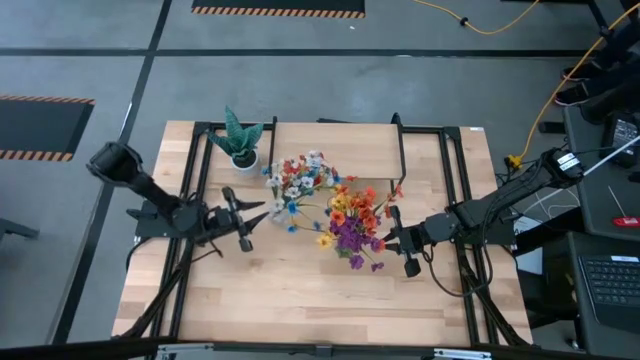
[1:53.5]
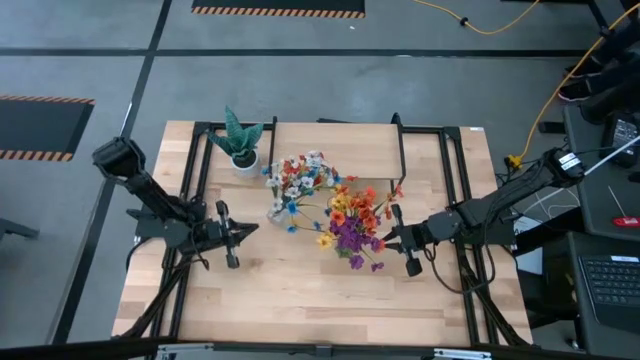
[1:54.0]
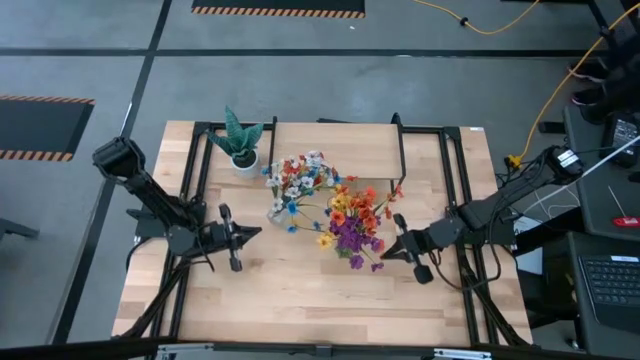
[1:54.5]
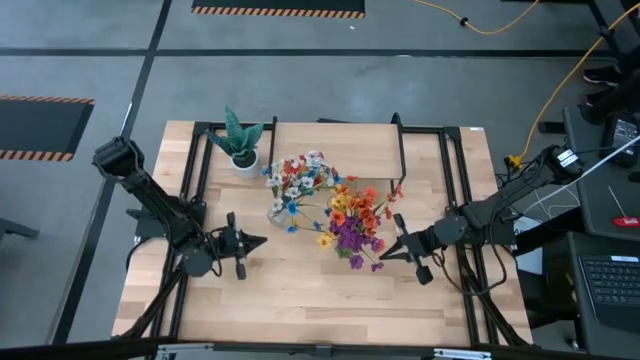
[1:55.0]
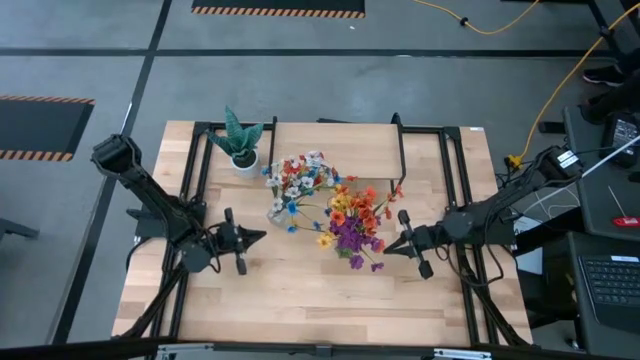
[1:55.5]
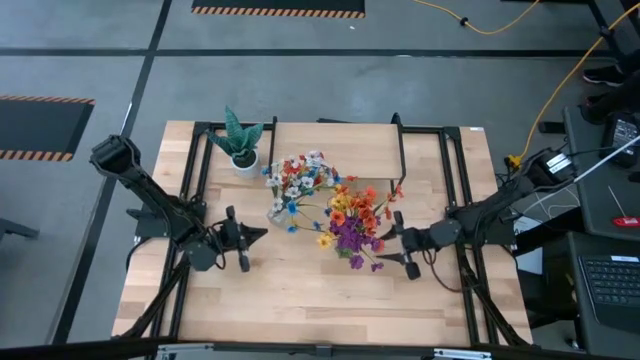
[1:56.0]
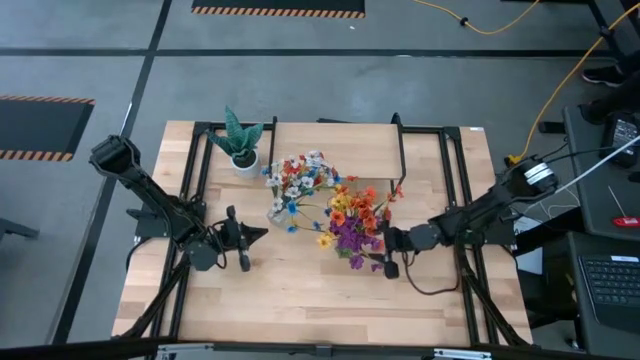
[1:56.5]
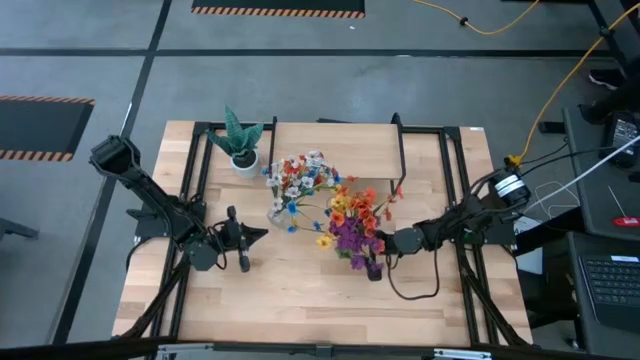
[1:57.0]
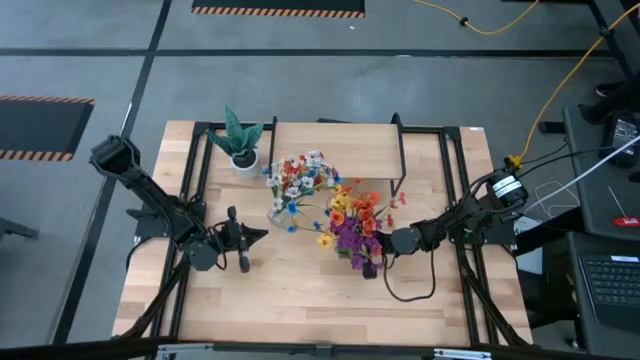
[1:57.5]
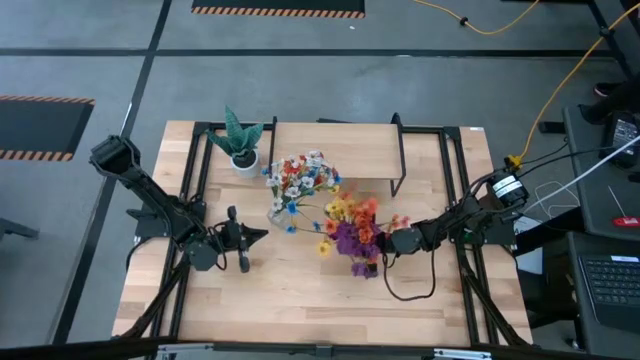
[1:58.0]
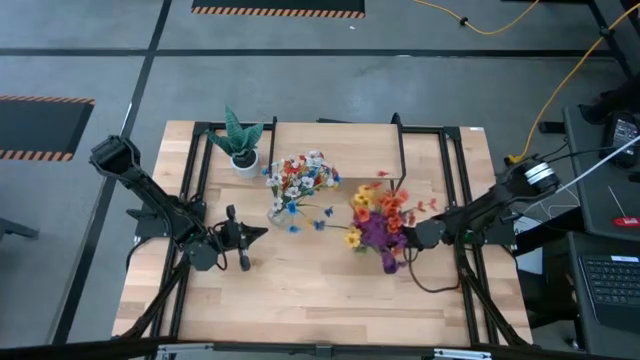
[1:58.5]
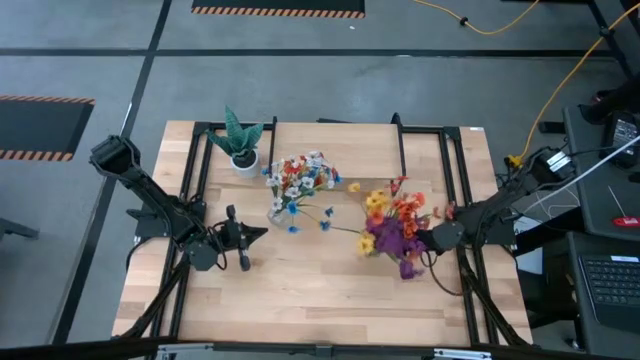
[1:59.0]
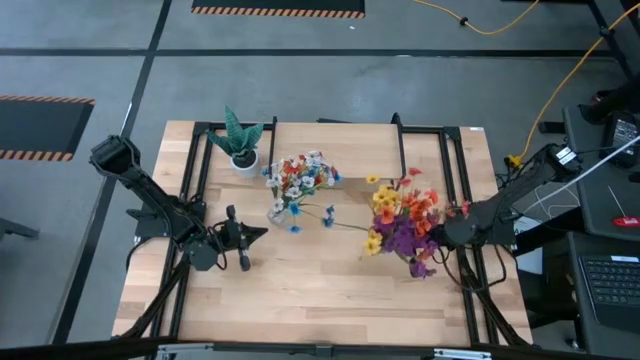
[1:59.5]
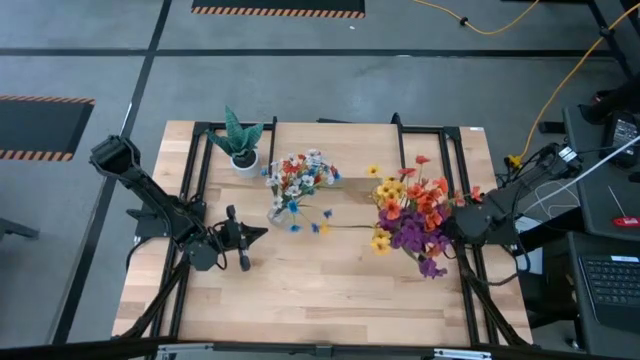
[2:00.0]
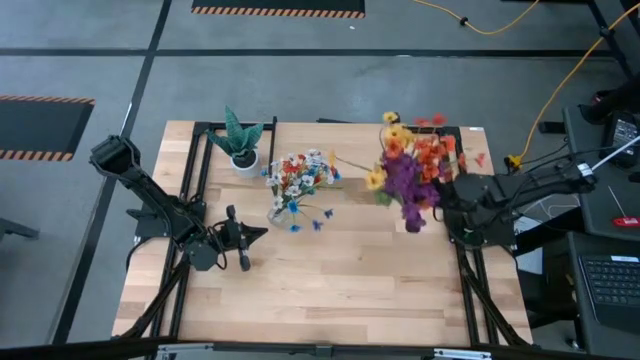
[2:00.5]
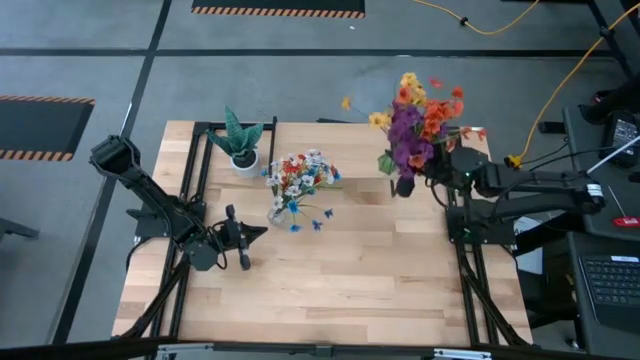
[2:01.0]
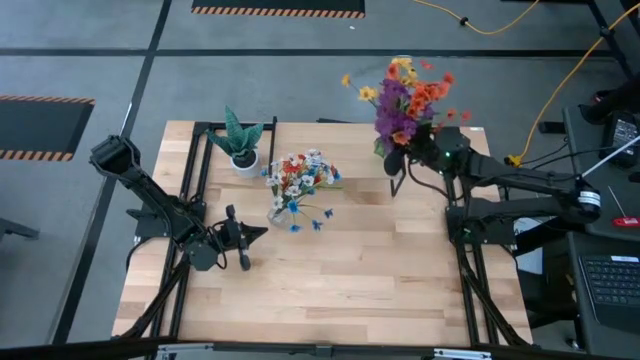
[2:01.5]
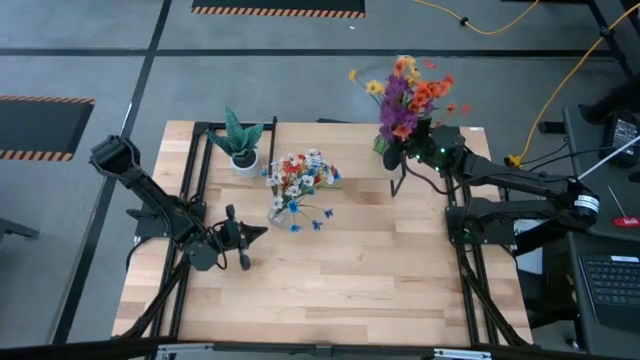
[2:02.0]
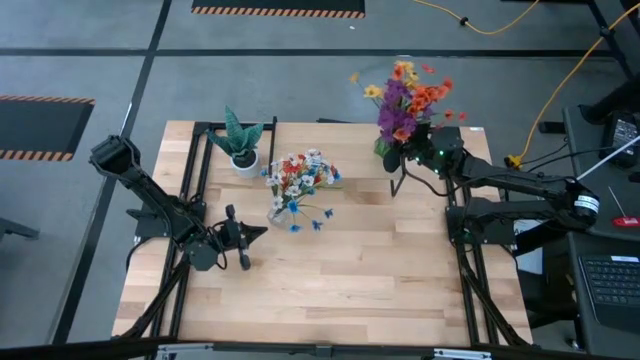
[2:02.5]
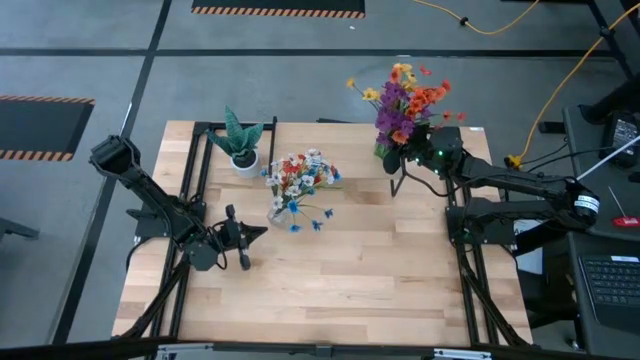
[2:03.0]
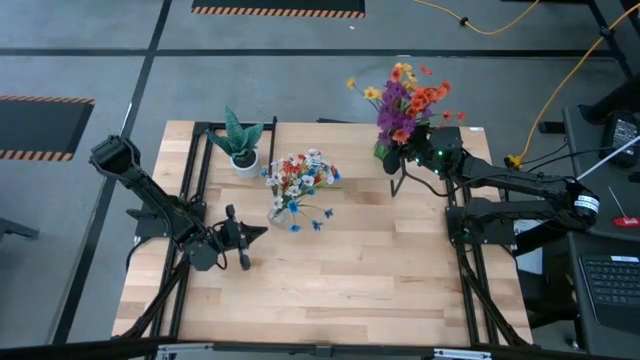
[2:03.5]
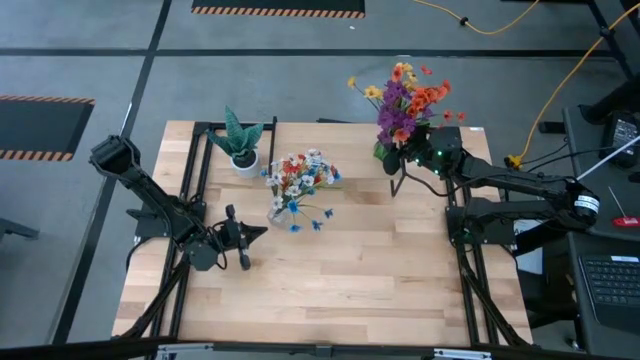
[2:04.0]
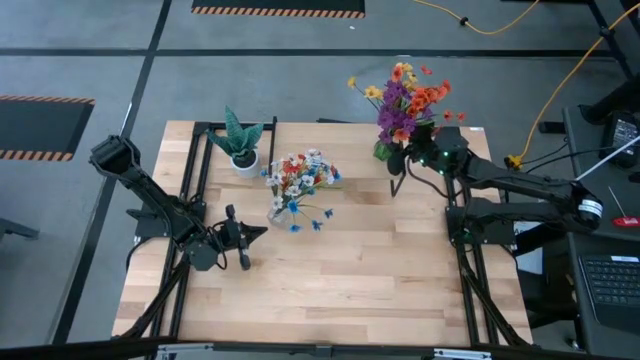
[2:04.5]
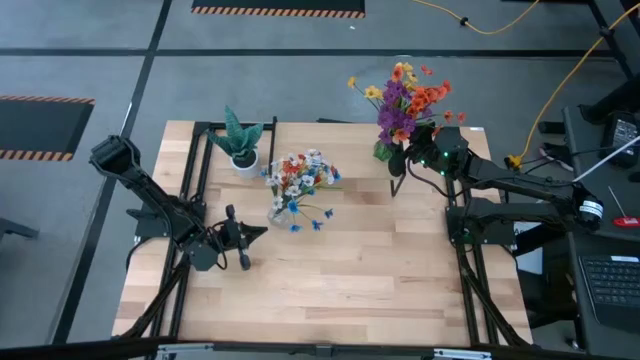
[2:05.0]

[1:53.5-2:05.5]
Task: Pick and place flowers into a vace then onto a shelf
Put the green flower vase on the shelf

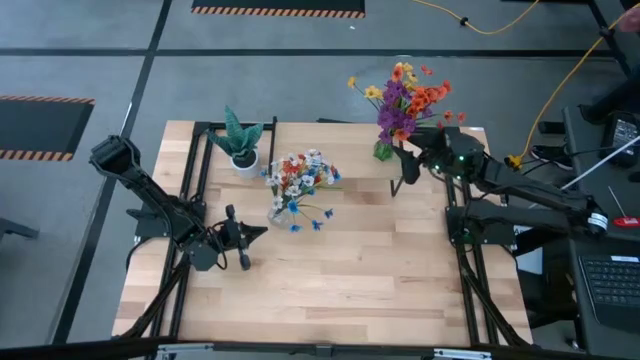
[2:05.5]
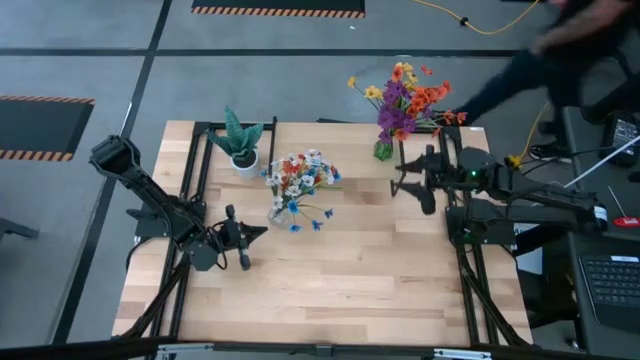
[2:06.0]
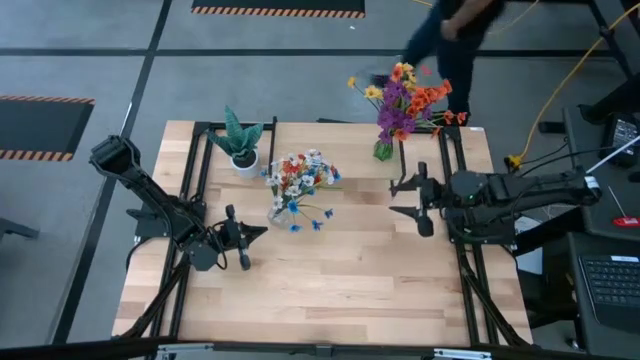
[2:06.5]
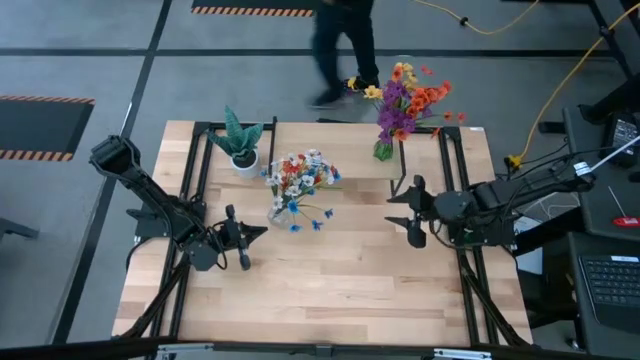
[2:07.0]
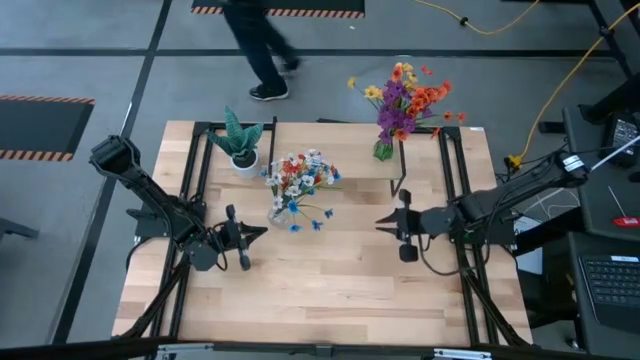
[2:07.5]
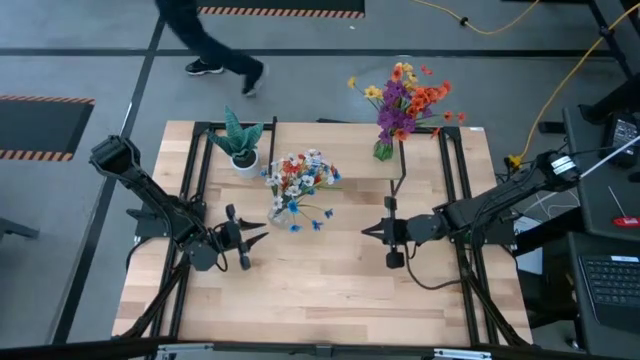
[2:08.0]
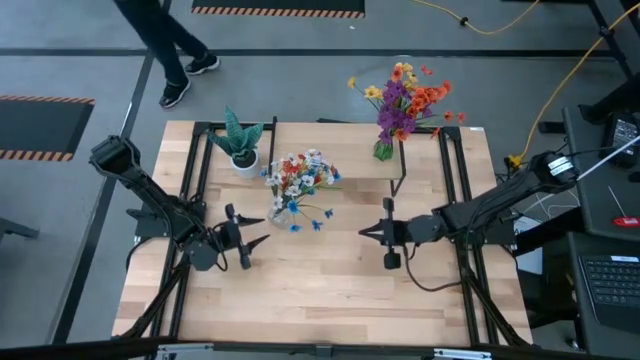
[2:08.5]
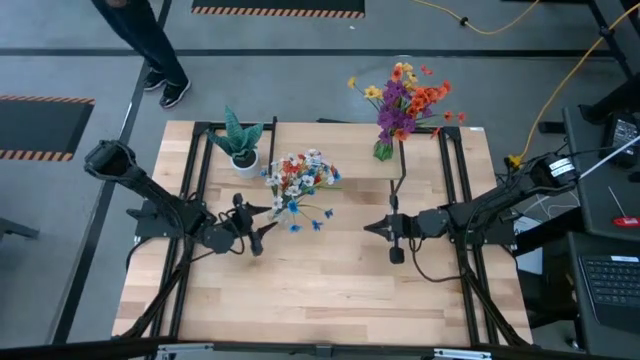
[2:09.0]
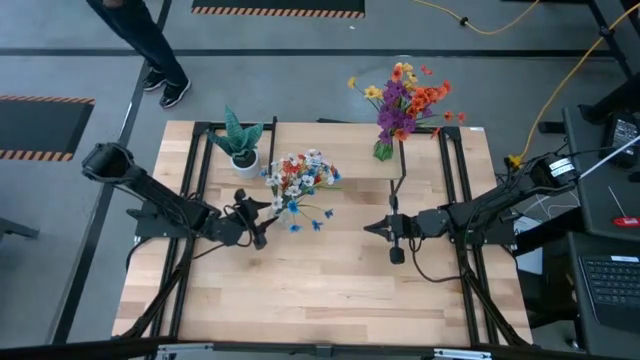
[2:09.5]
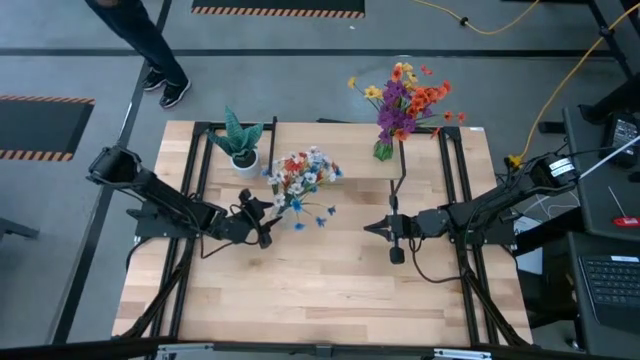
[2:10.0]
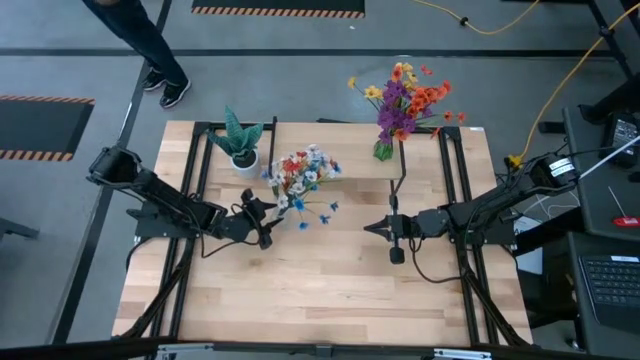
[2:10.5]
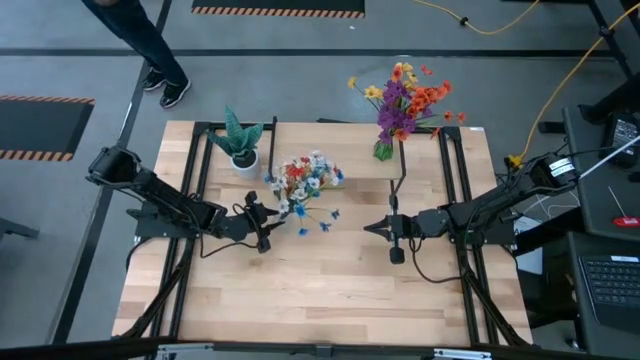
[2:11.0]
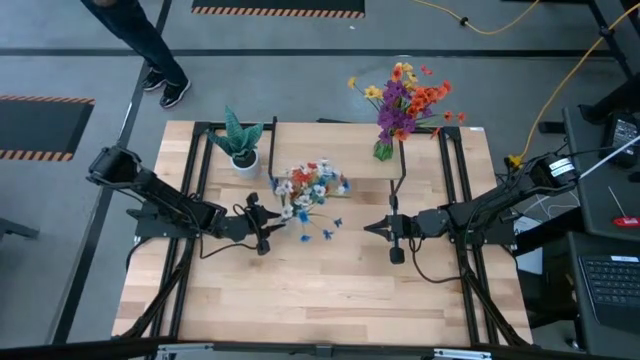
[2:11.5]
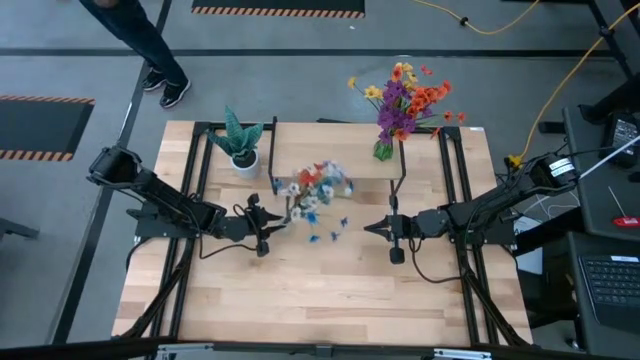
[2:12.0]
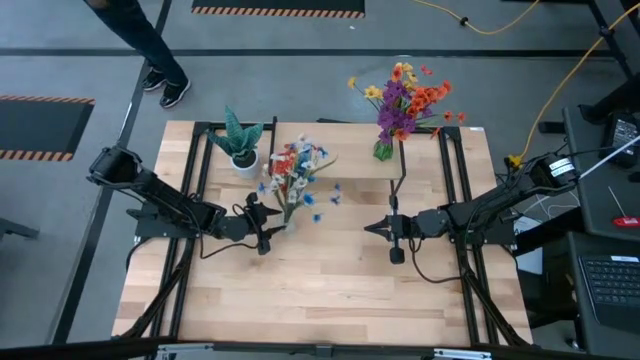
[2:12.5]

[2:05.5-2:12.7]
Put the transparent flower vase on the shelf

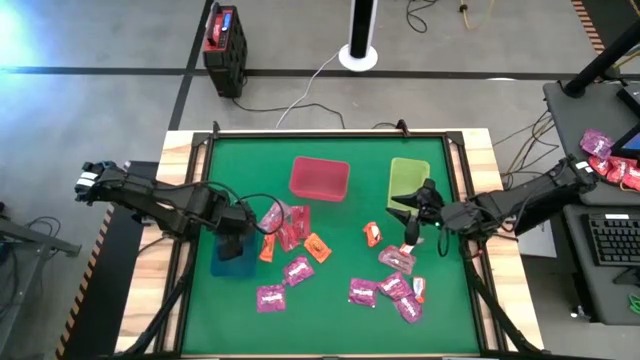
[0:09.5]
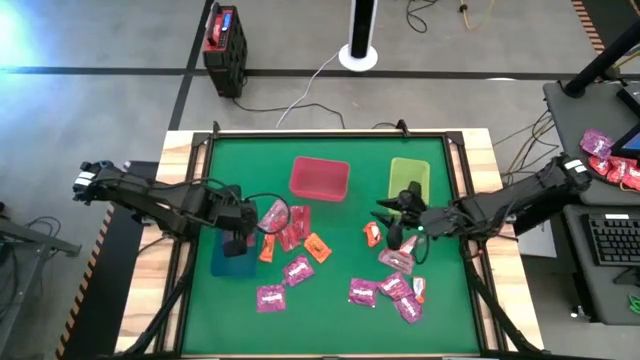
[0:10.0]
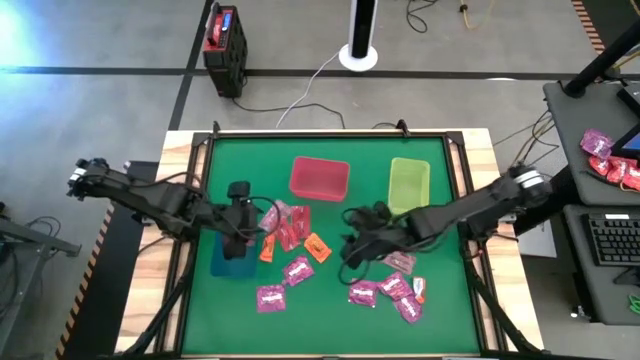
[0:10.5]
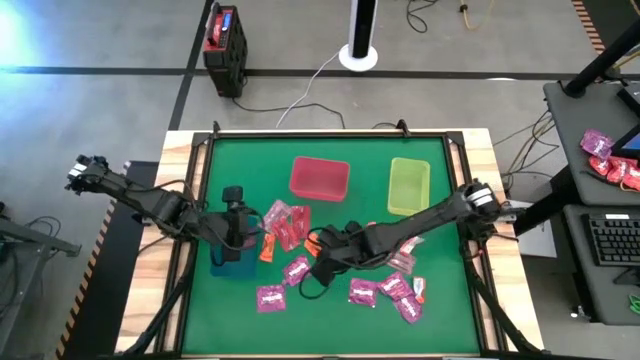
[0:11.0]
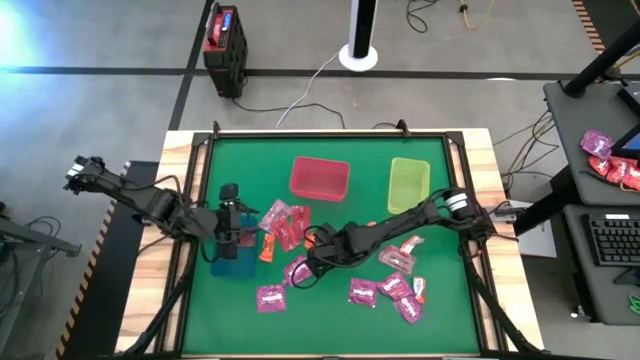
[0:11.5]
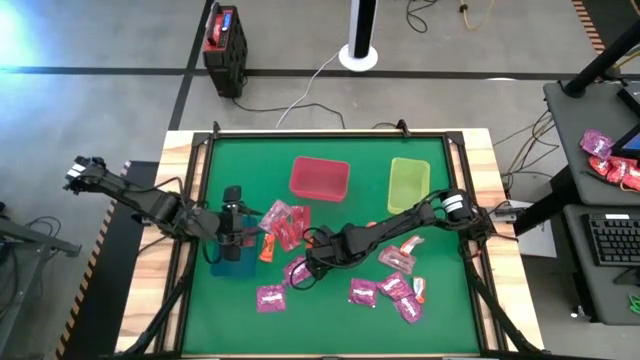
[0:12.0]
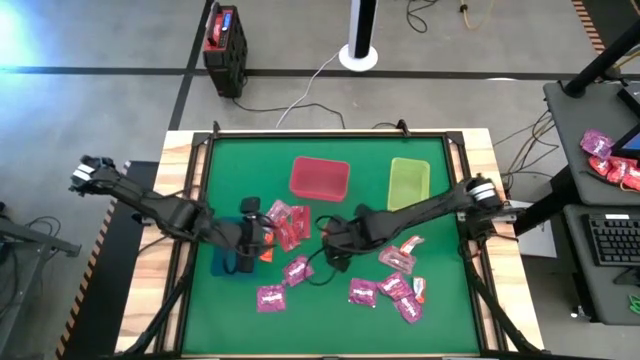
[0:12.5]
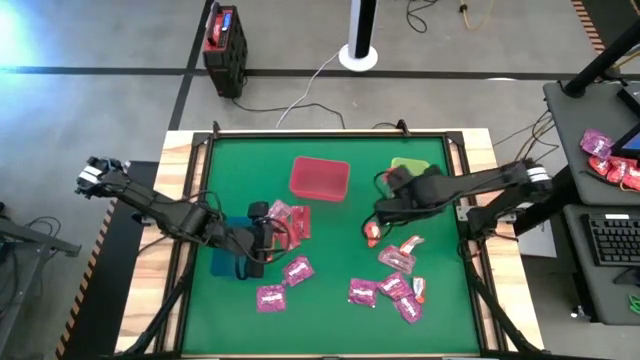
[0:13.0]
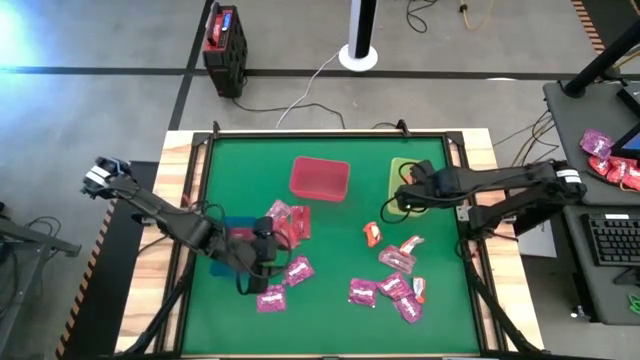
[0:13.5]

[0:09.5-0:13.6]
Task: Sort candy by brand, put in halloween buckets
Put the orange chocolate into the yellow bin
